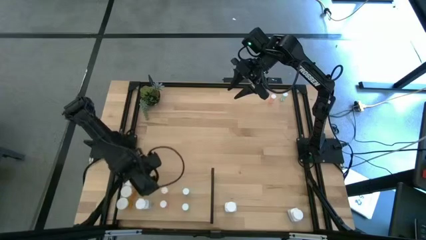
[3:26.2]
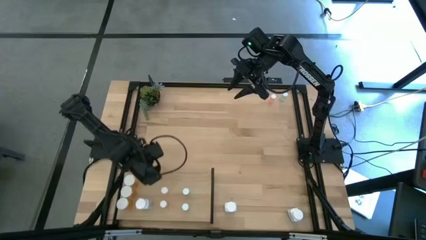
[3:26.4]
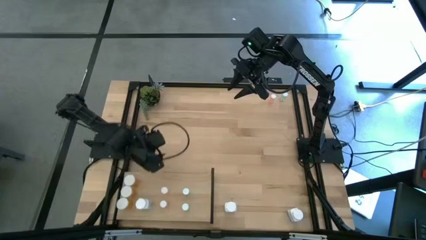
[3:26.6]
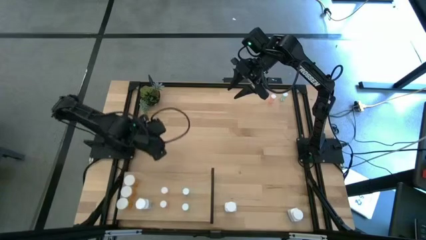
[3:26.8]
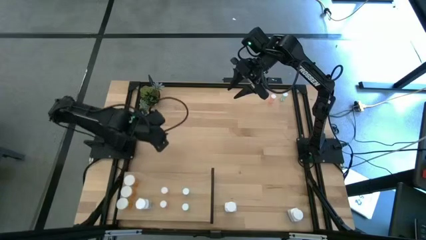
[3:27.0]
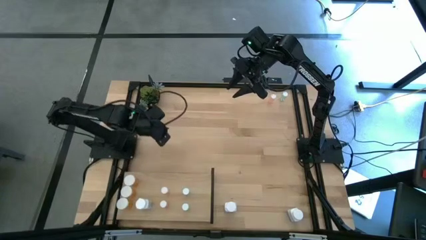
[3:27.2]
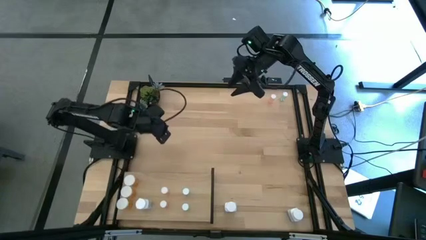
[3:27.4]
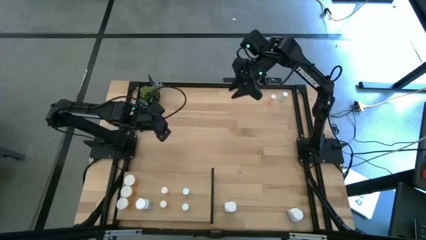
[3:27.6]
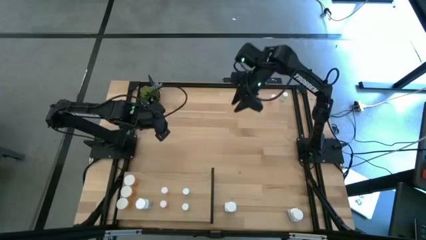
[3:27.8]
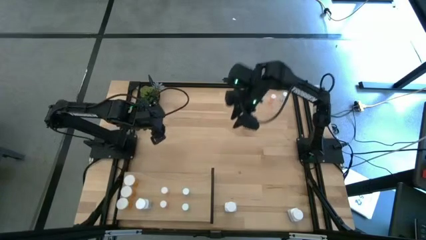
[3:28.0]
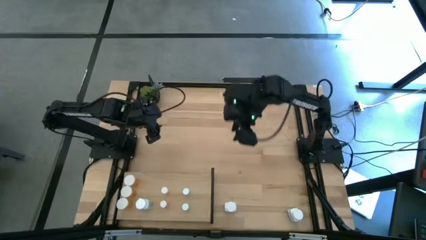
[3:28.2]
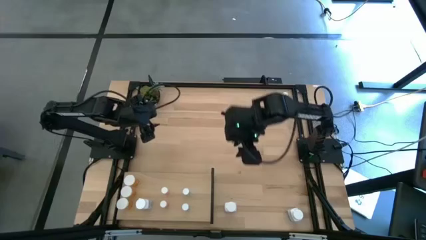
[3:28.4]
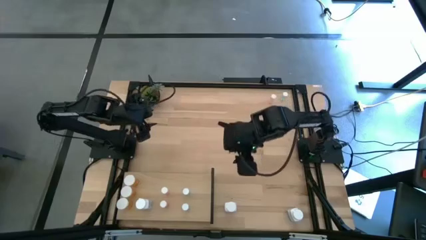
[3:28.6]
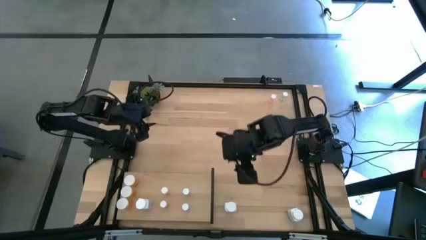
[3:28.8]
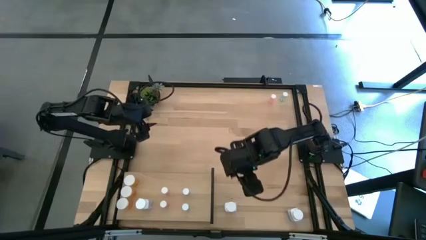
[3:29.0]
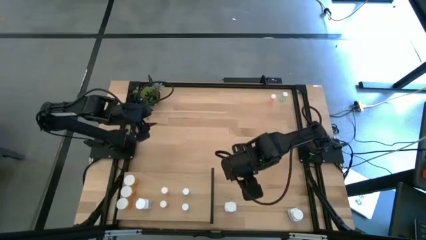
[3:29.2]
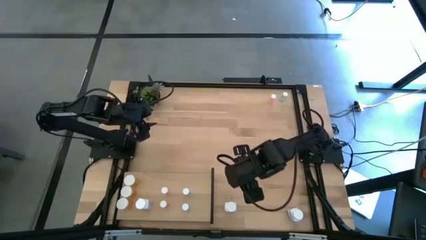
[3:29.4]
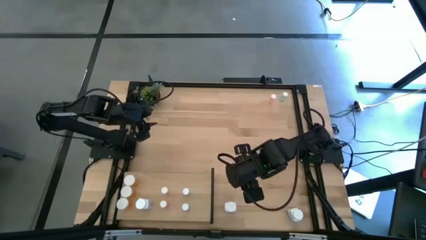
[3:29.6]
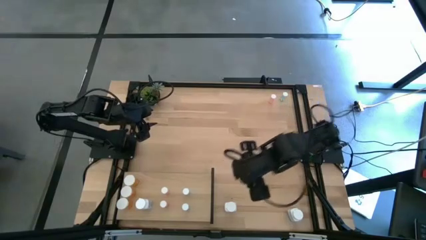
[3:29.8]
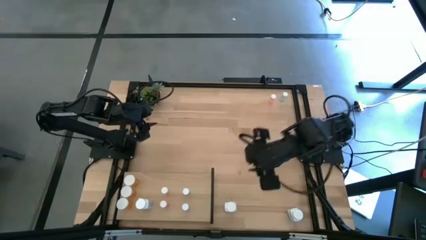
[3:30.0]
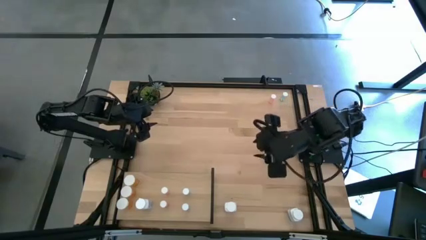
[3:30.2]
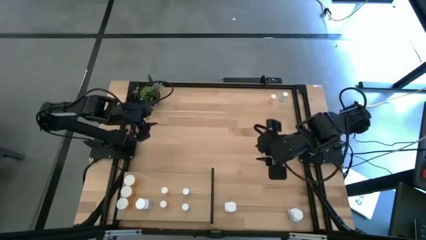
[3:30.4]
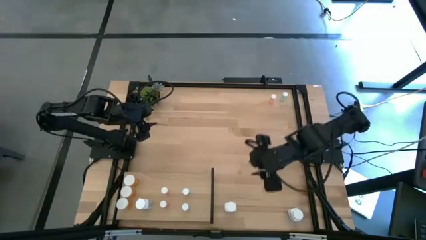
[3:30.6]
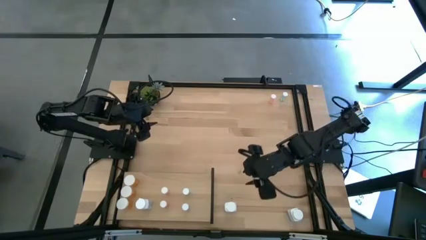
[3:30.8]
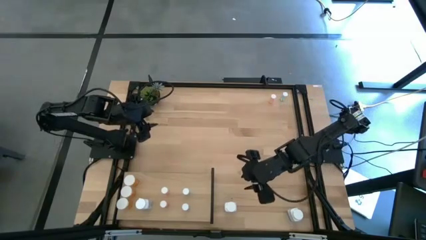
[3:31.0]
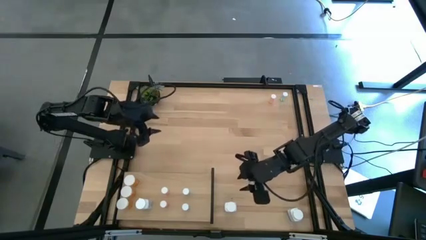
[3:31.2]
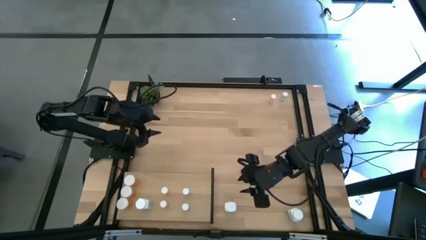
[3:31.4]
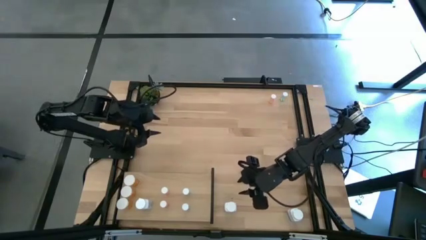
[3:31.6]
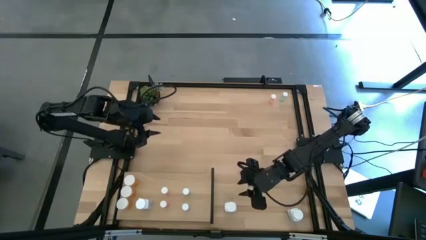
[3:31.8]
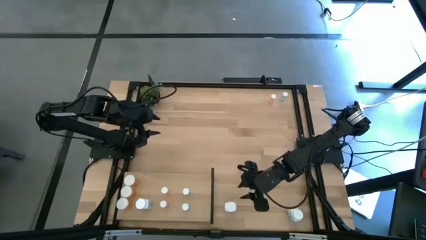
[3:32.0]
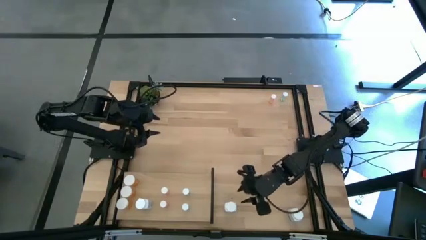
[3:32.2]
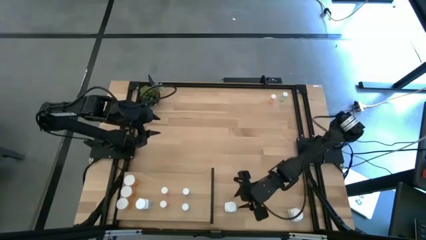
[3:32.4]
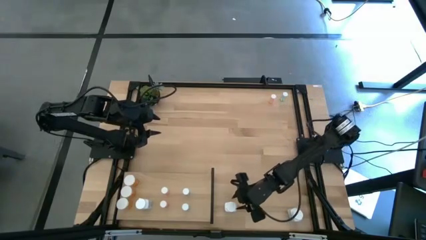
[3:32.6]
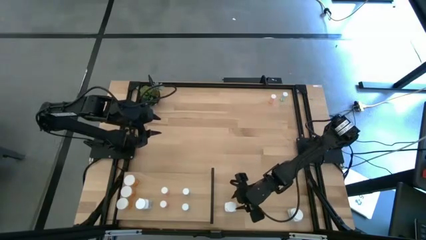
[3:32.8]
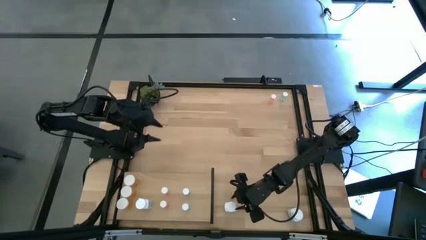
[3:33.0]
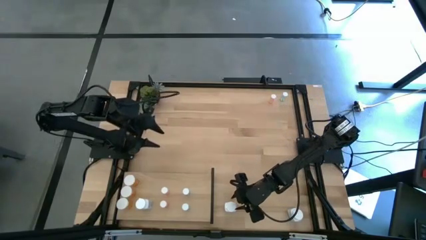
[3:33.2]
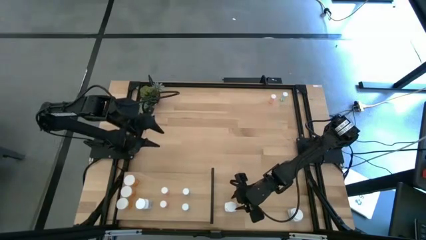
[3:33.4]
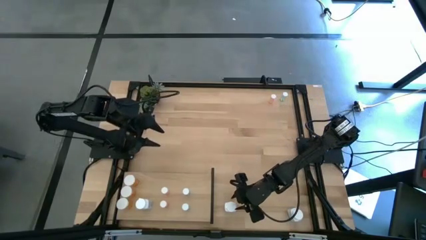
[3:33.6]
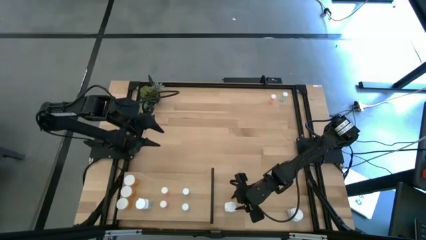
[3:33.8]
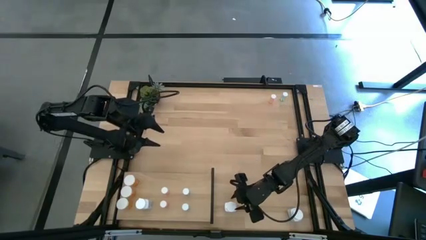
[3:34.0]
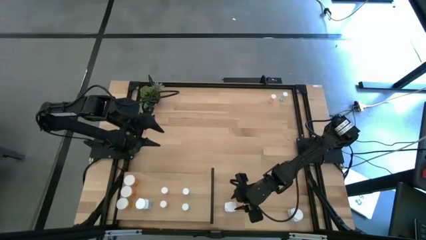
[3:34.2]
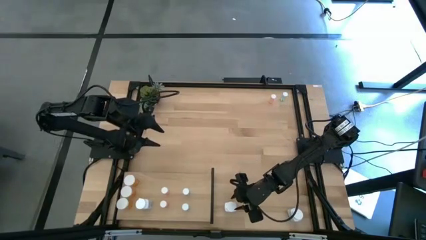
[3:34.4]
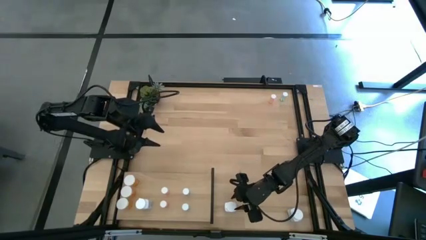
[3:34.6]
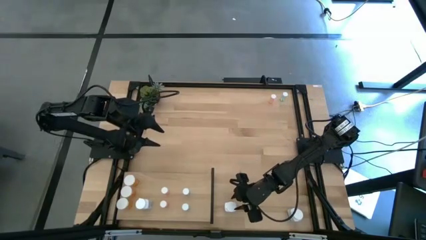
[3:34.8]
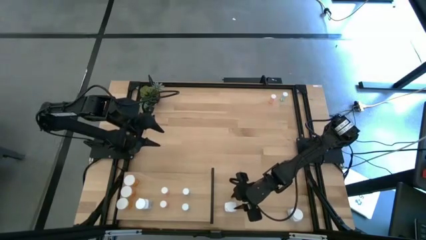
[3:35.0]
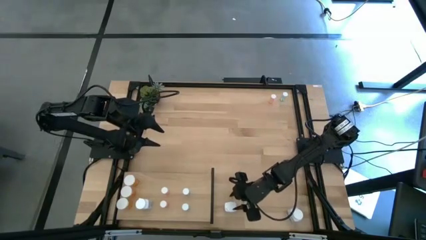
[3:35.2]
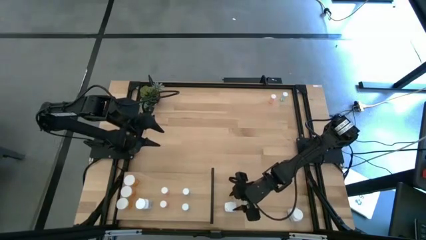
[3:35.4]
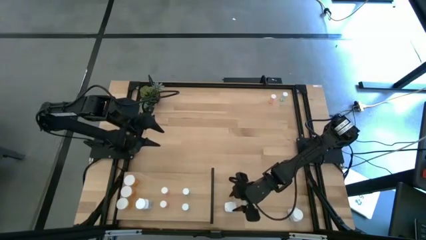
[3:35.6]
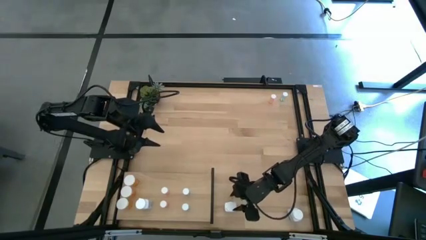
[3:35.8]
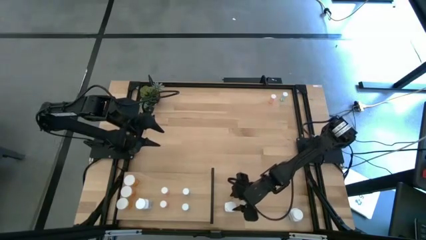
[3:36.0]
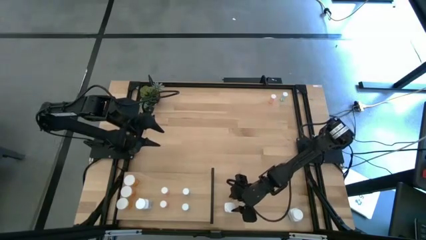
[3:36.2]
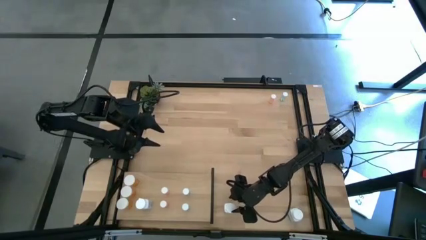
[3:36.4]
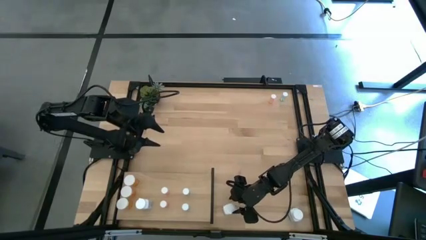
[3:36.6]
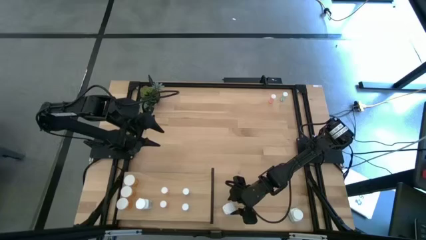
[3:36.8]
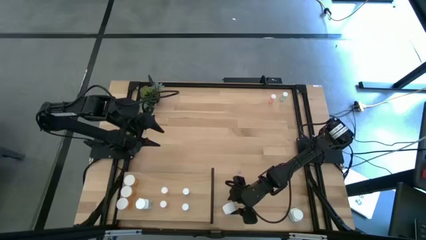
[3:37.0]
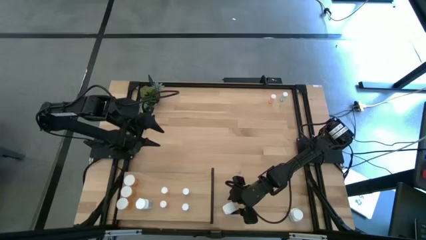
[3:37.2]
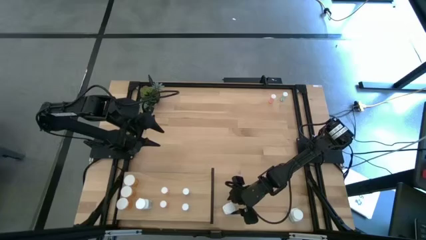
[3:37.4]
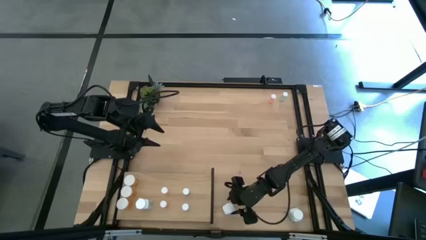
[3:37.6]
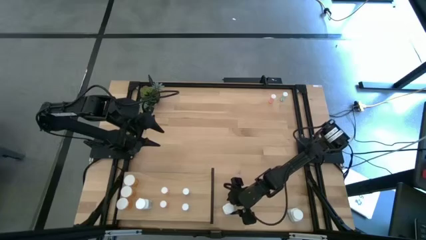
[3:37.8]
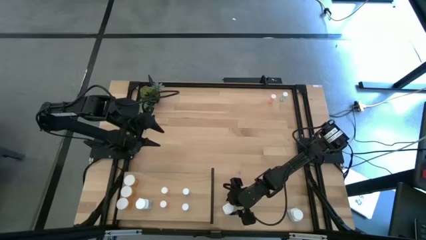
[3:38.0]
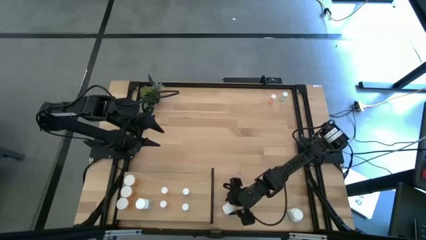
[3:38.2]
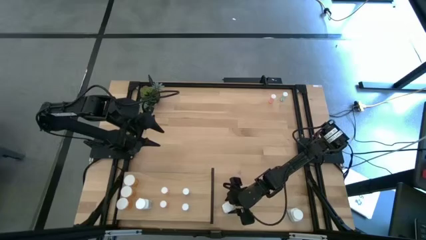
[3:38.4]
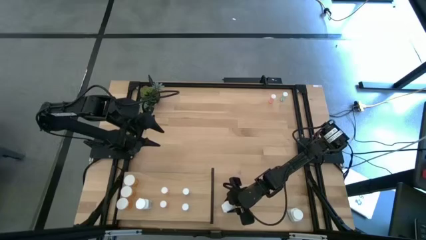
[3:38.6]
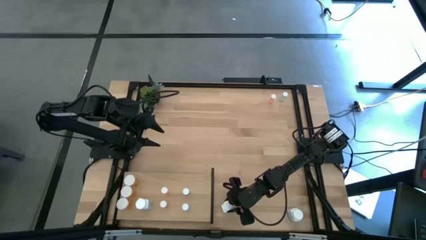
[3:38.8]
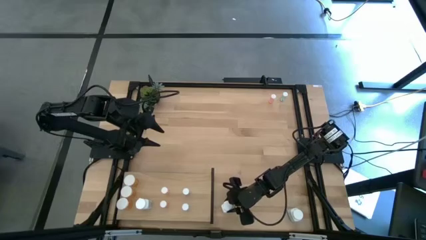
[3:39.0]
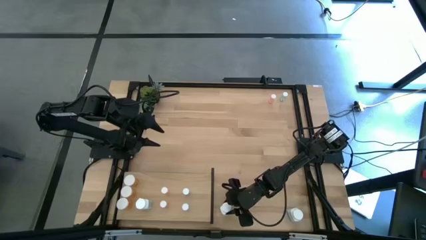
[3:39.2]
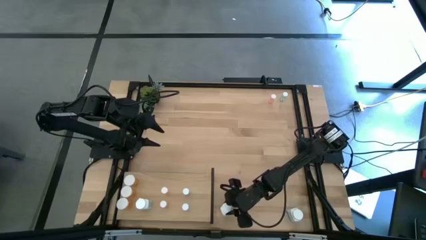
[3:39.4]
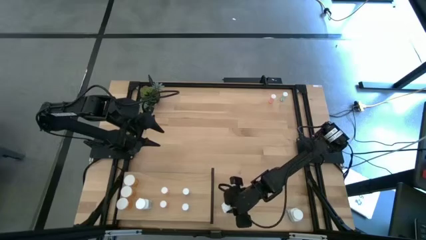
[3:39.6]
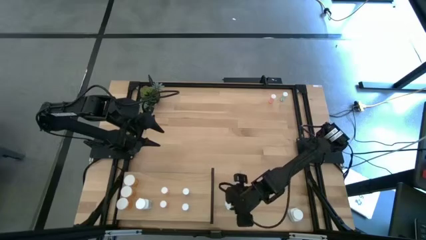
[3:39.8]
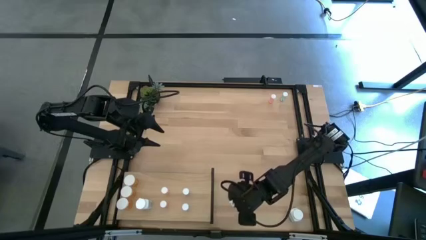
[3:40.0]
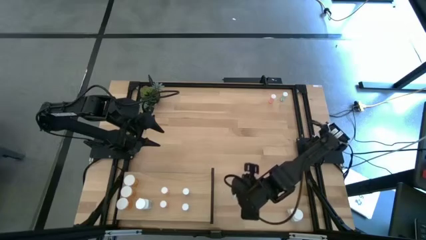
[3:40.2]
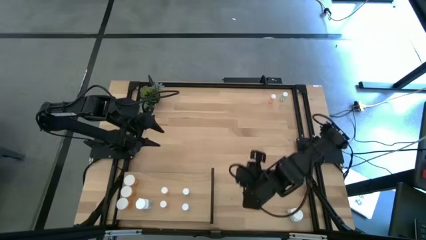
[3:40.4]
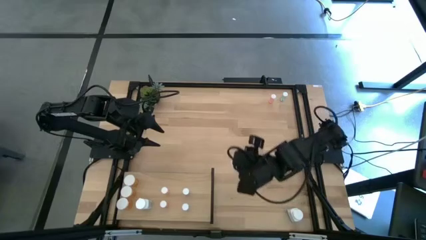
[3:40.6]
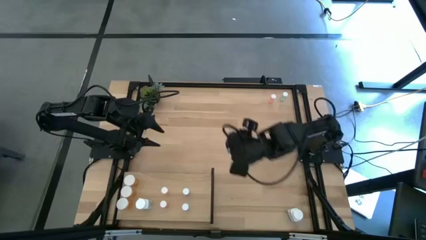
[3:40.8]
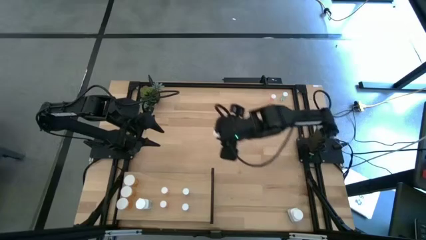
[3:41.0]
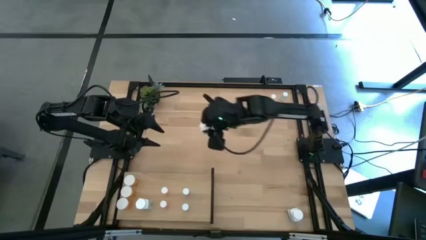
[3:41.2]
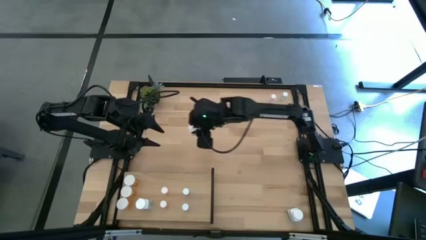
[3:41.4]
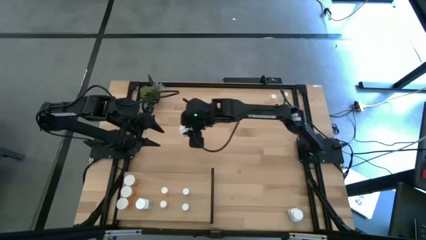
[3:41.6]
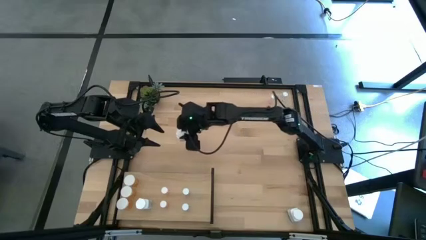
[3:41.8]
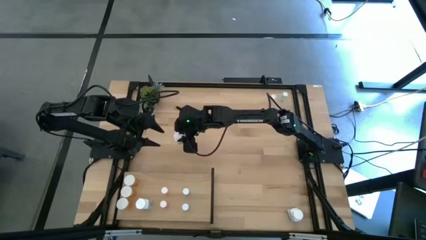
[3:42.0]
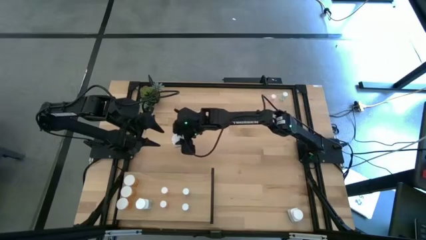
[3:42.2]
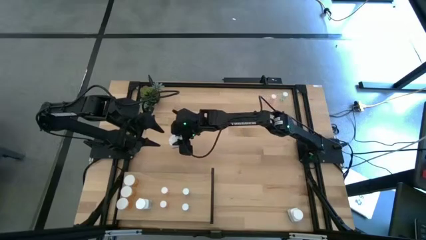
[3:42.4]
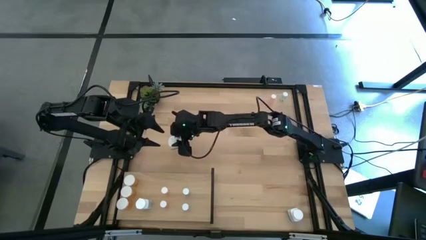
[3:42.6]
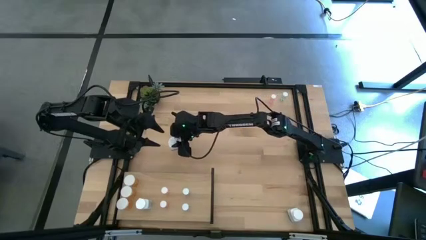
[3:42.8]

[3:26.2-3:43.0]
Task: Pick and place medicine bottles onto shelf by color
Put the left big white pill bottle on the shelf aligned with the other big white pill bottle
